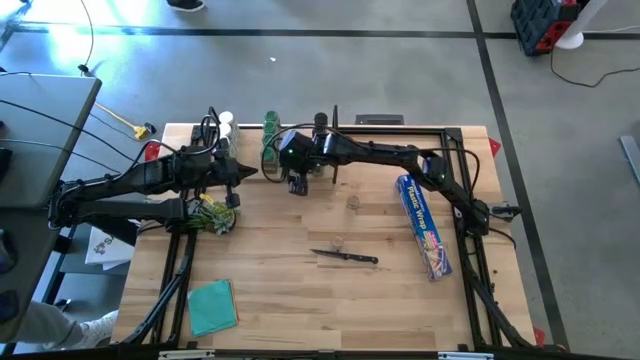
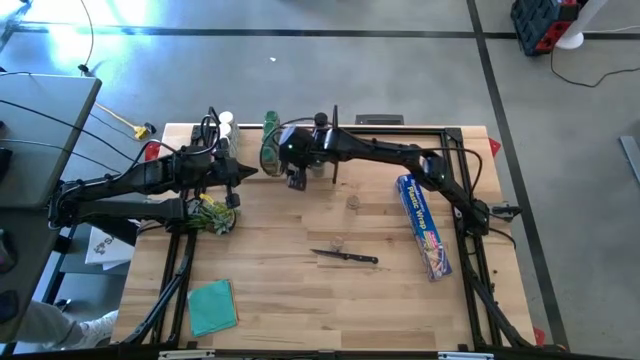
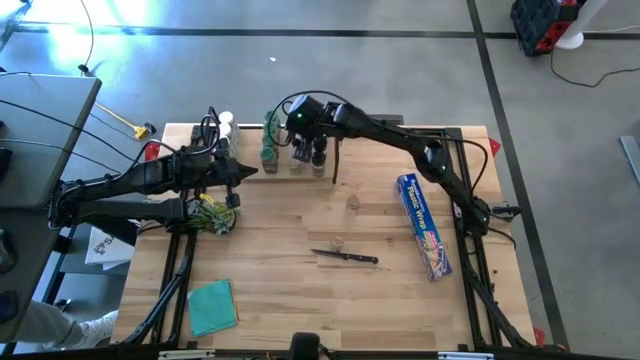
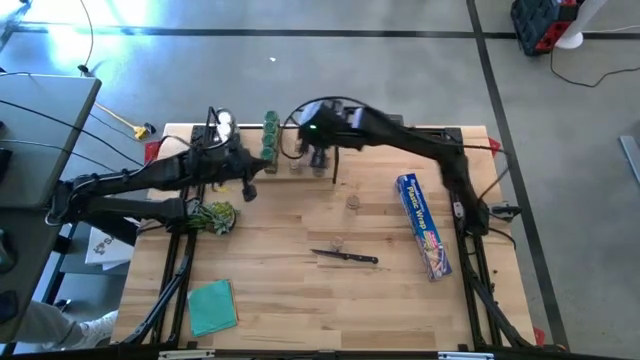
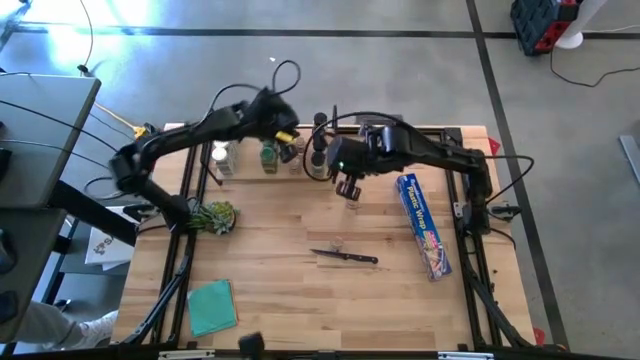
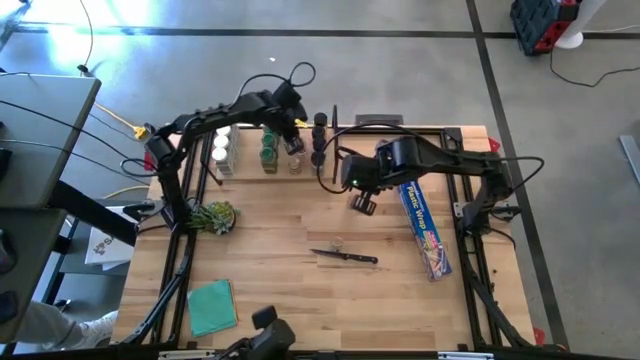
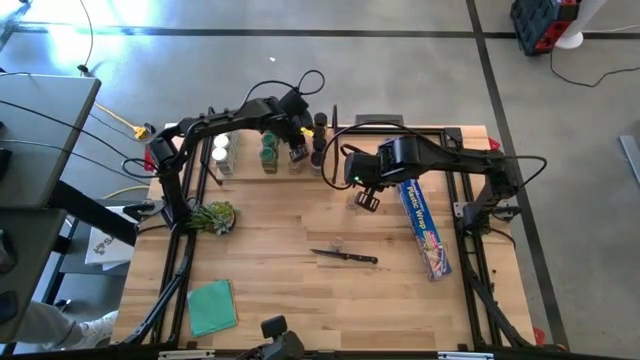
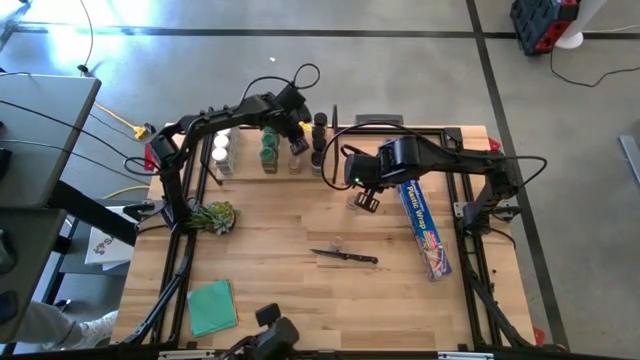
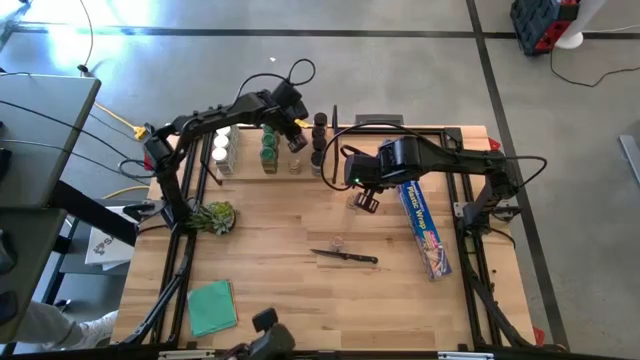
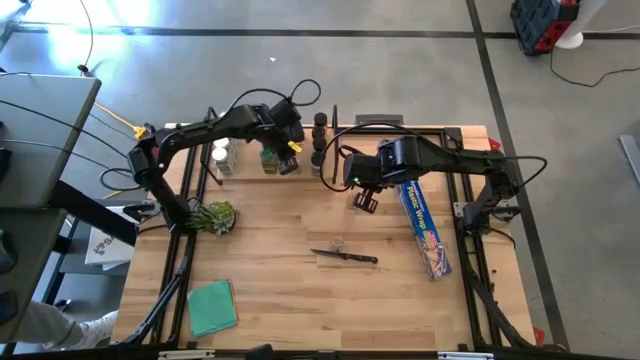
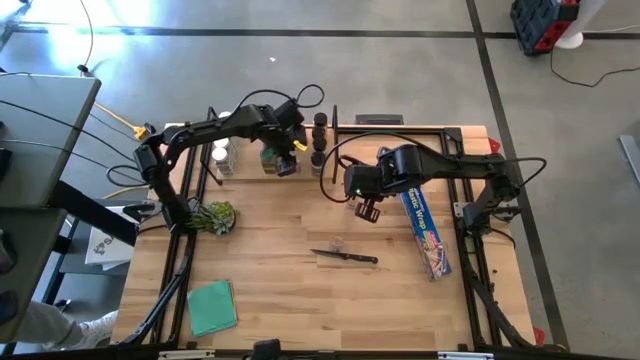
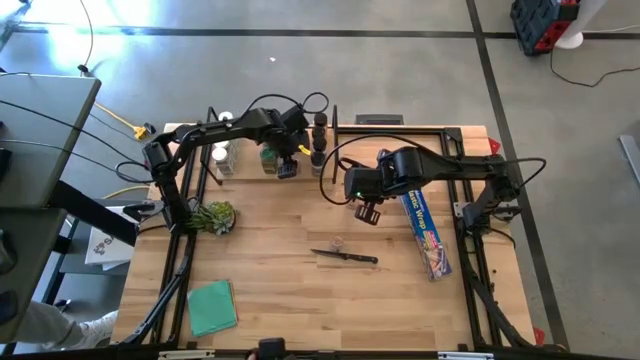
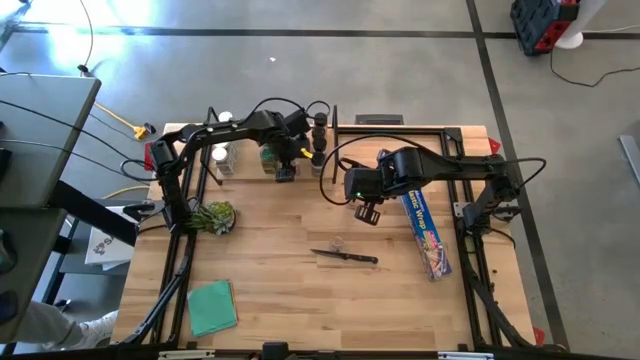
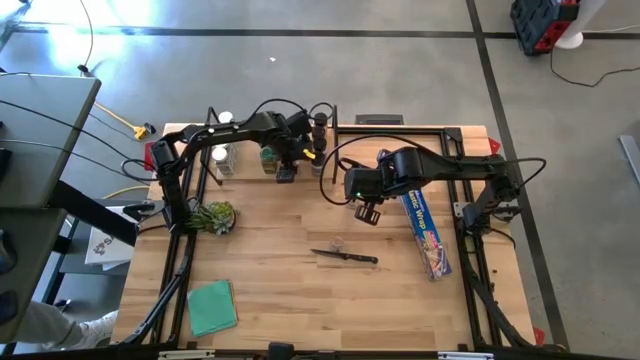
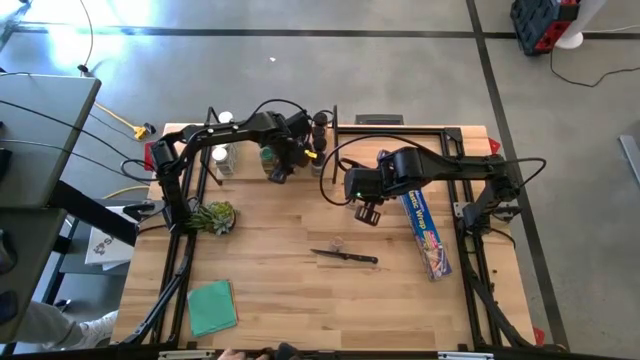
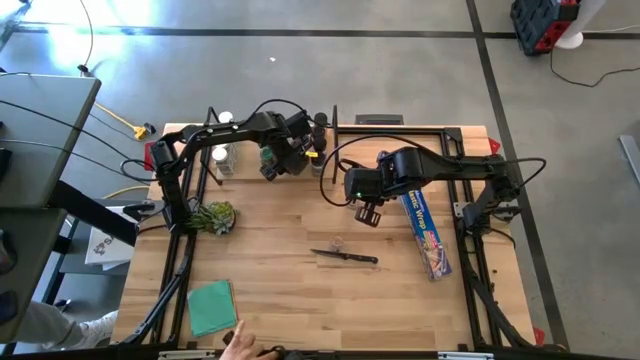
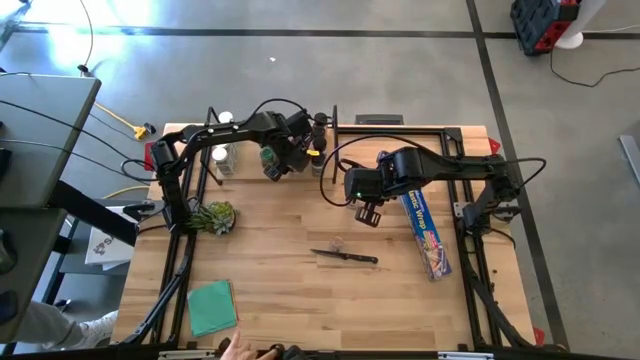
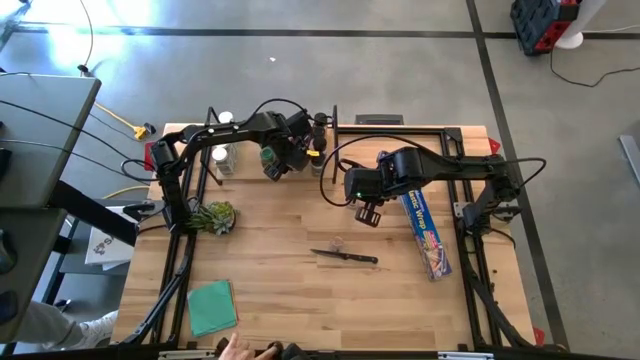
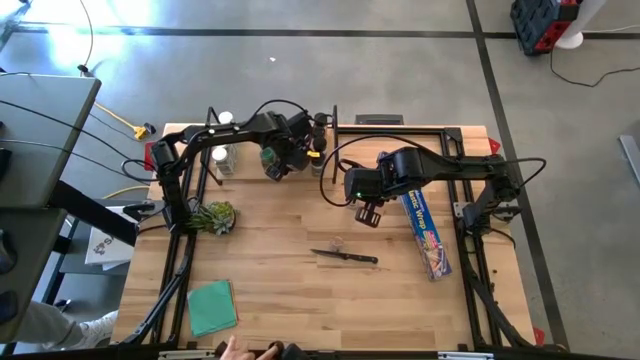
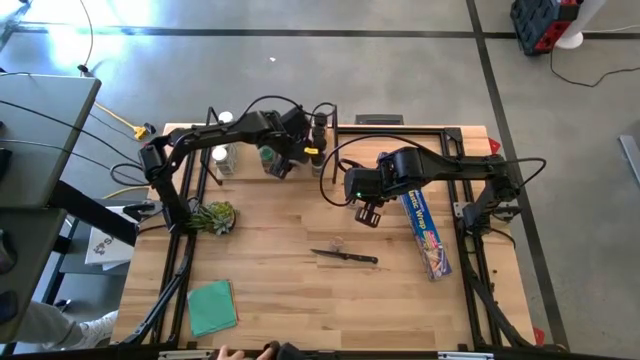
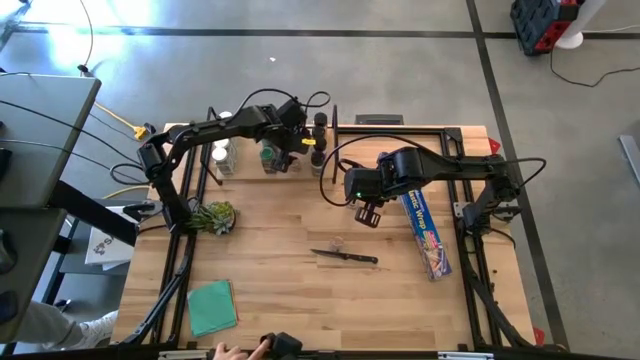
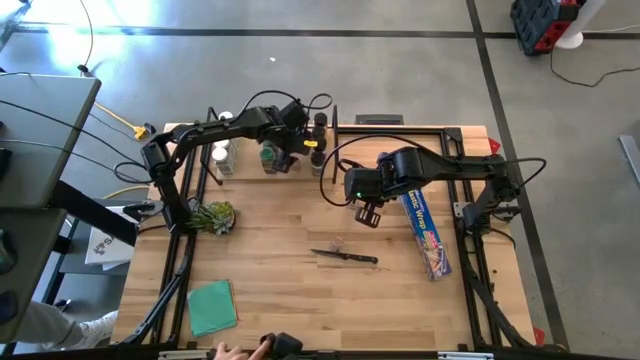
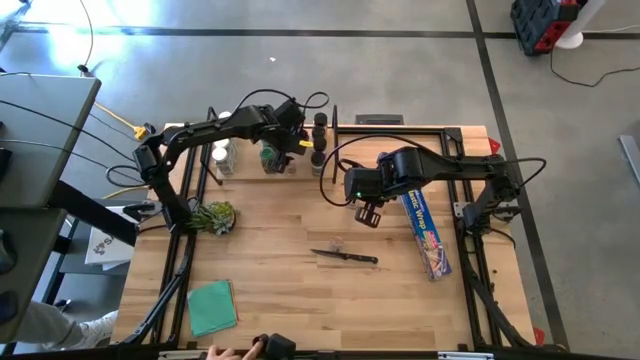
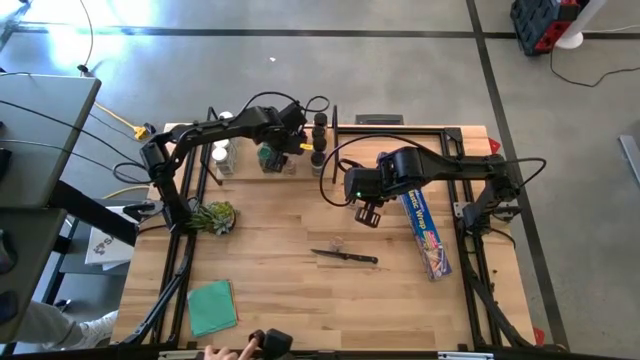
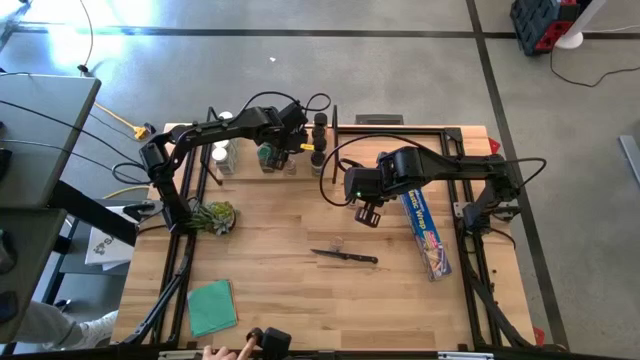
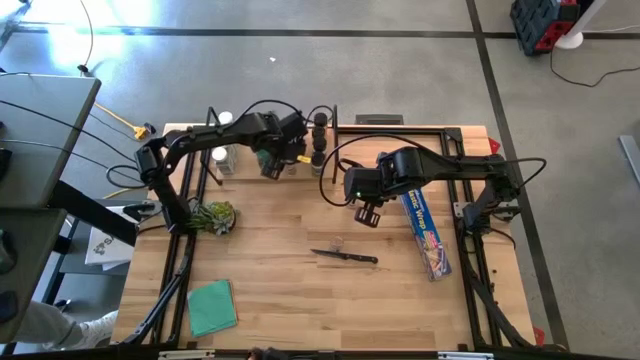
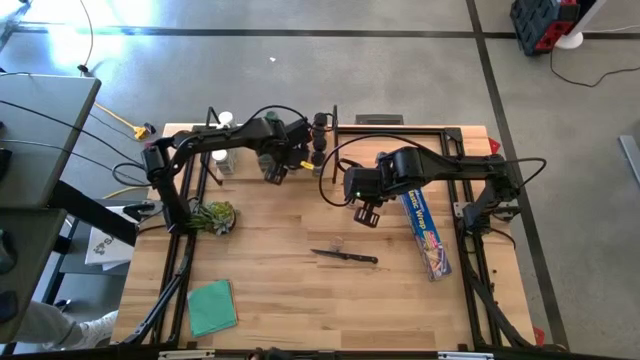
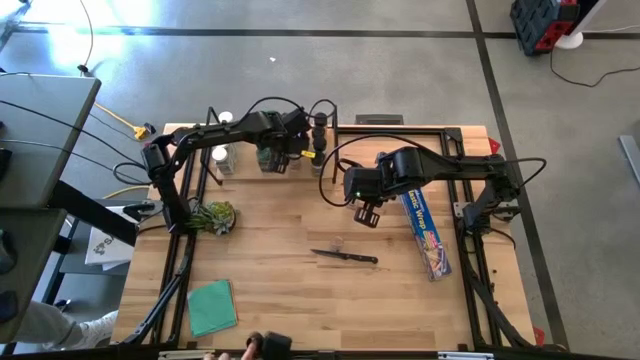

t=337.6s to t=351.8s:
Task: Shelf spices
Adjust the brown and green lid seasoning bottles on the shelf

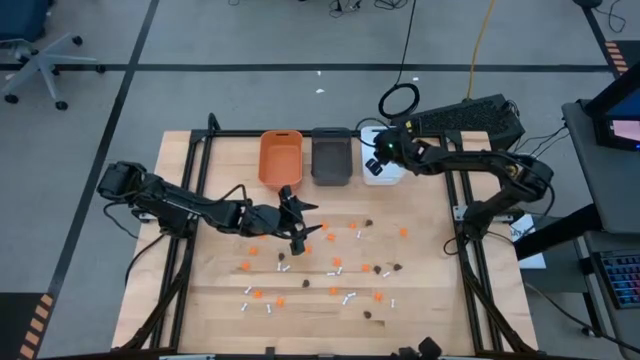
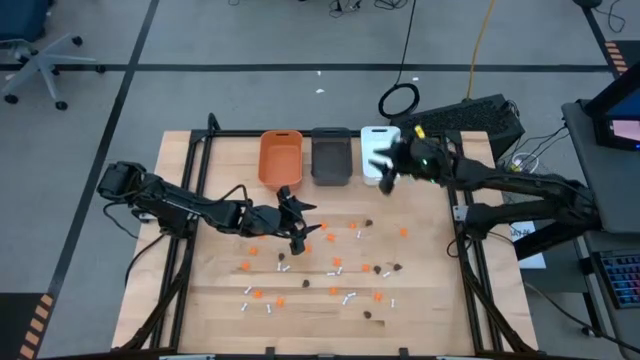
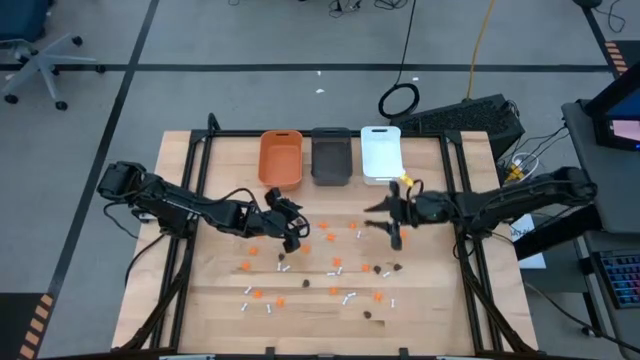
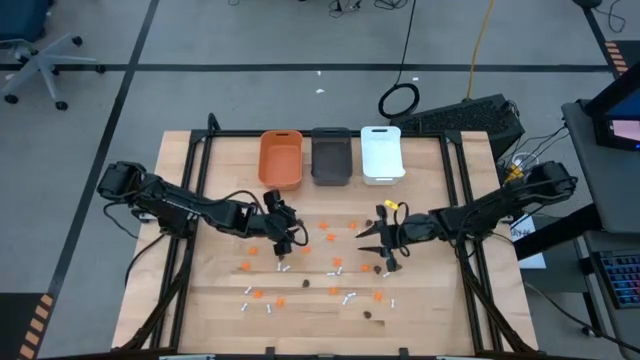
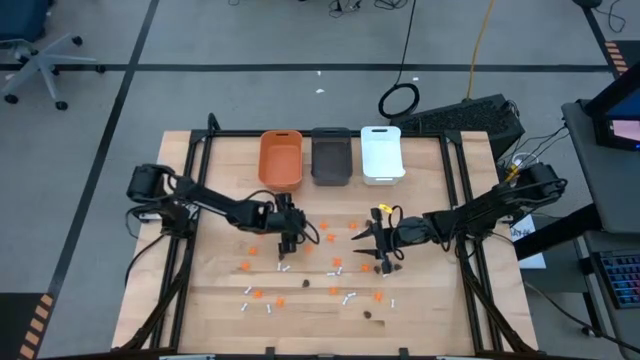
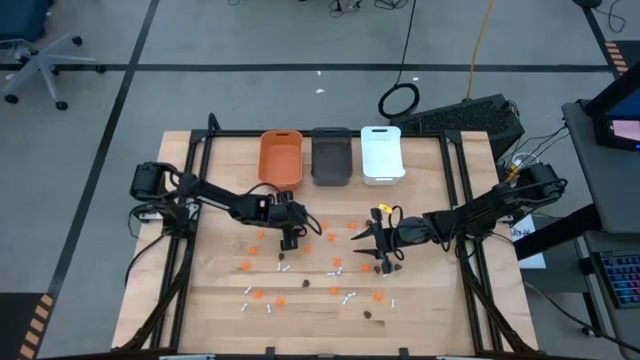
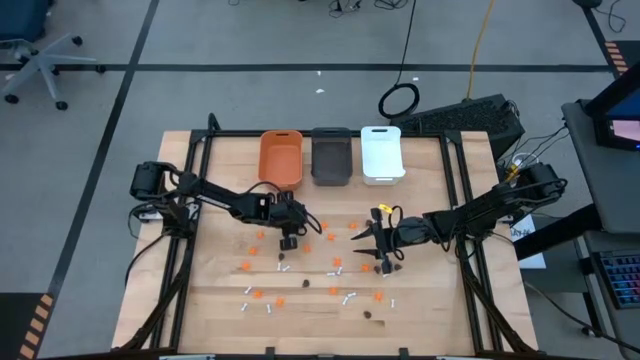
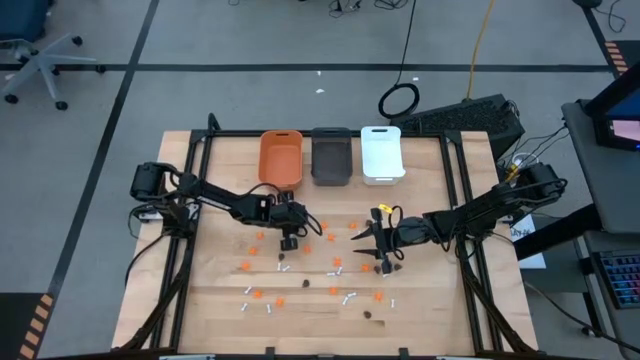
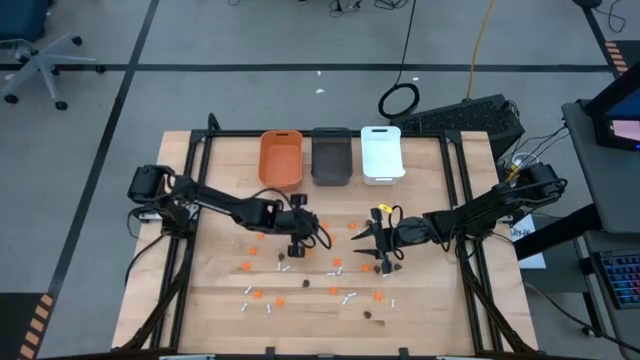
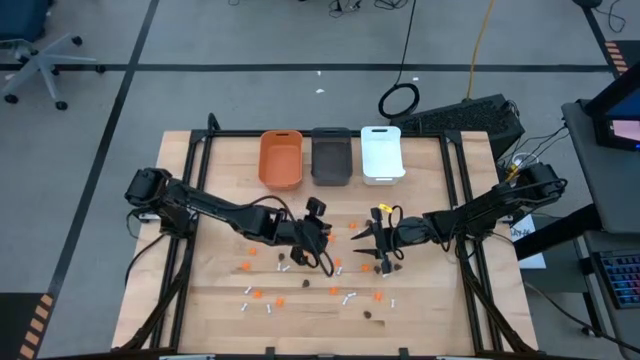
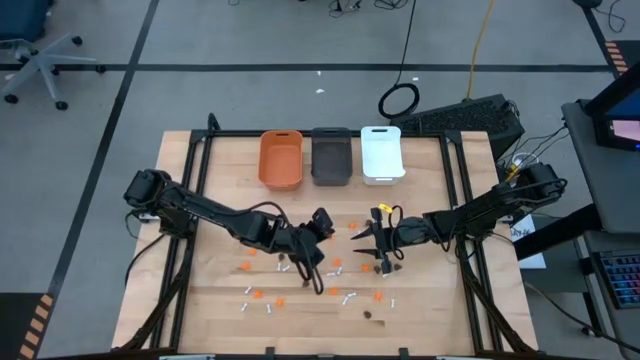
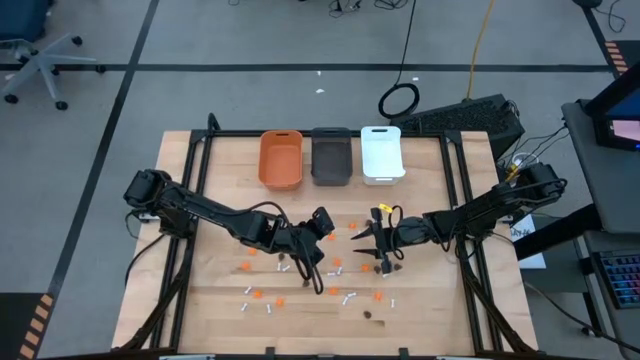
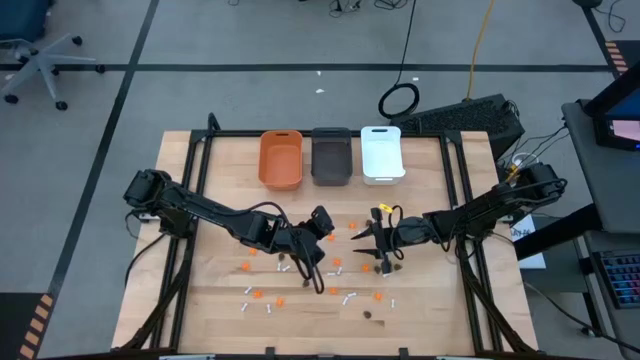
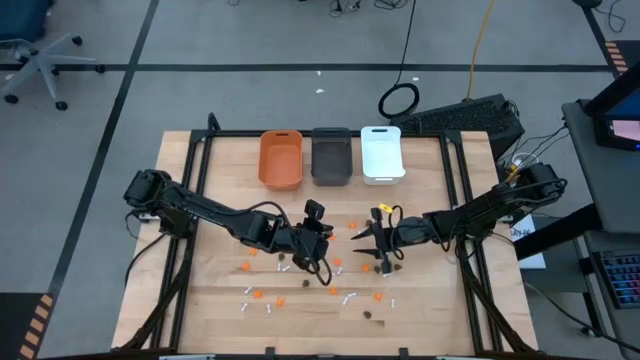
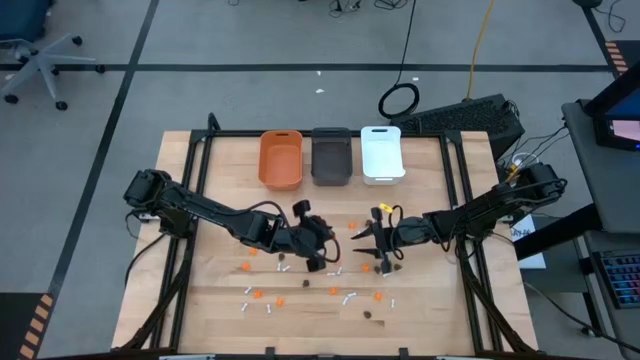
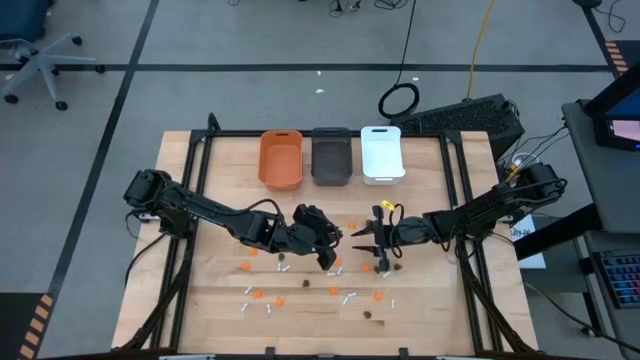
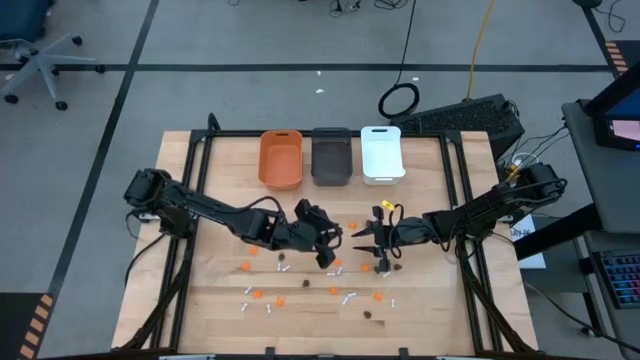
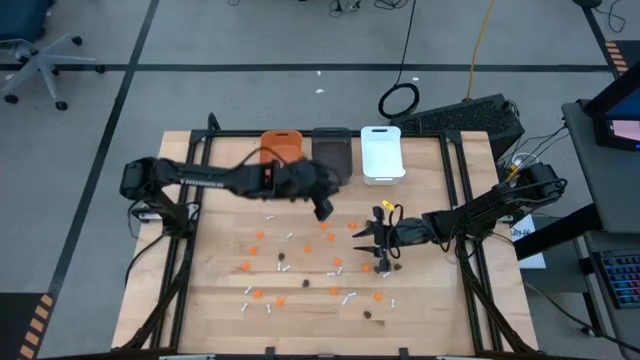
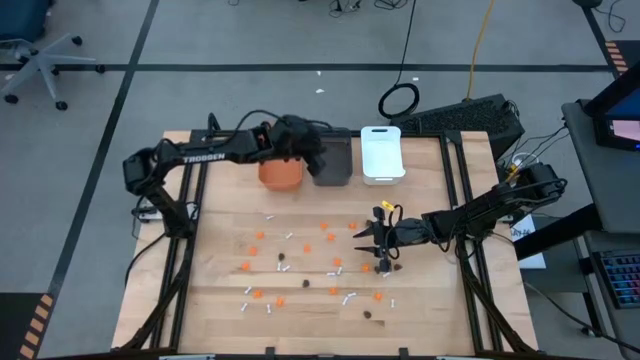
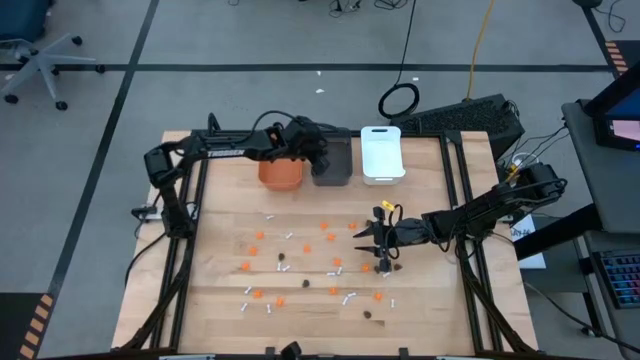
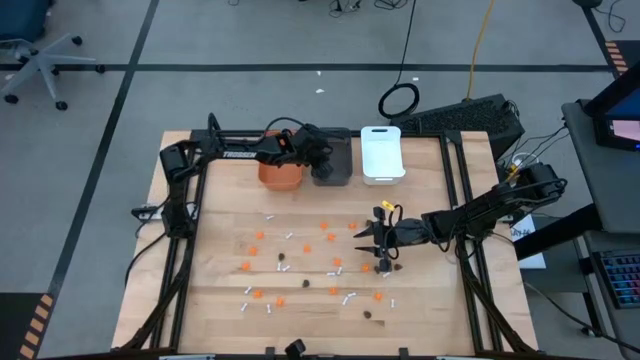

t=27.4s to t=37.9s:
Task: Sort Halloween decoration
Put the black skull toy into the black bin
